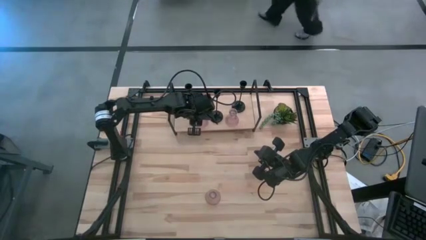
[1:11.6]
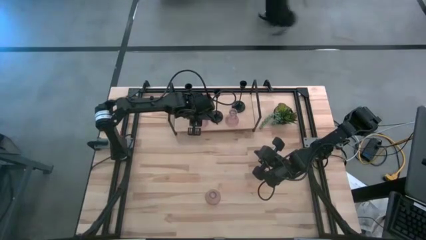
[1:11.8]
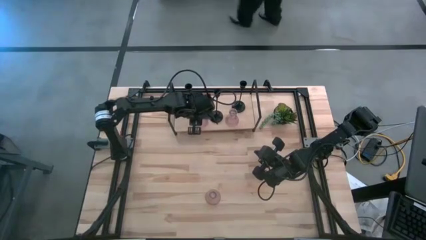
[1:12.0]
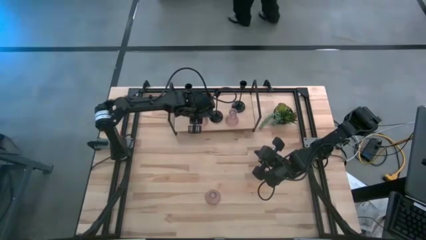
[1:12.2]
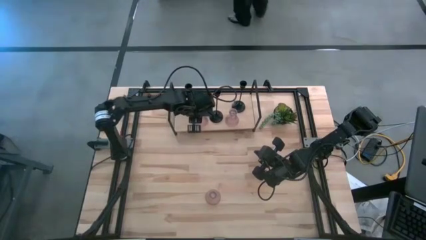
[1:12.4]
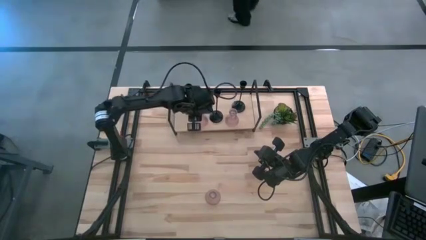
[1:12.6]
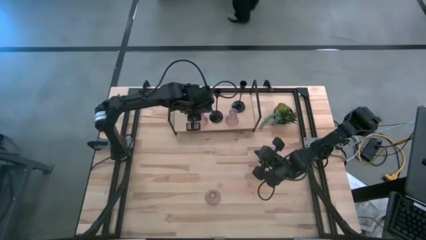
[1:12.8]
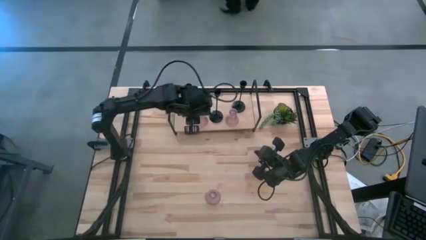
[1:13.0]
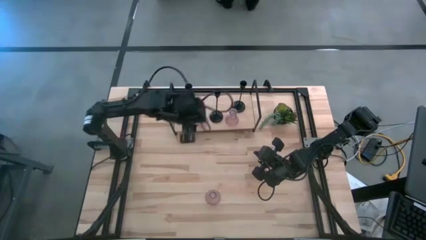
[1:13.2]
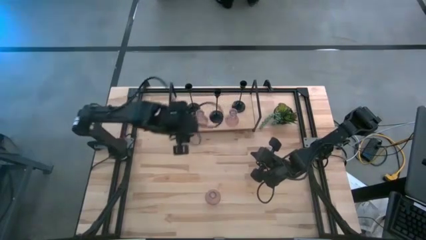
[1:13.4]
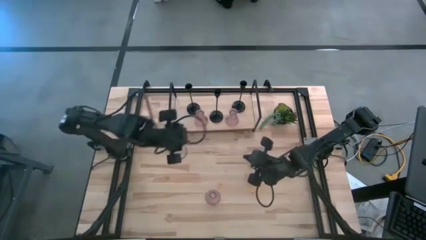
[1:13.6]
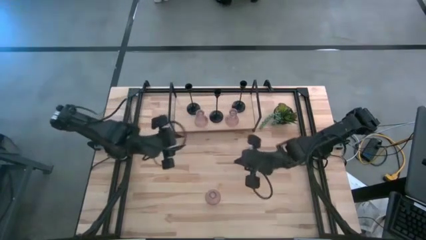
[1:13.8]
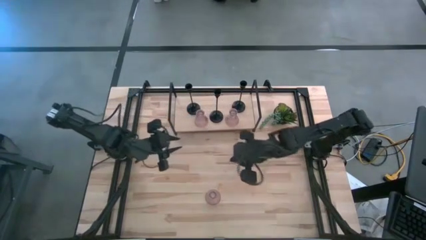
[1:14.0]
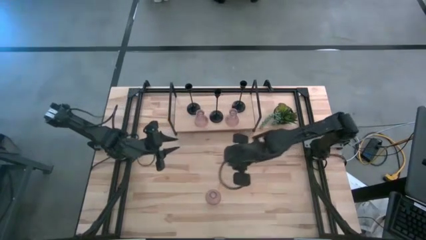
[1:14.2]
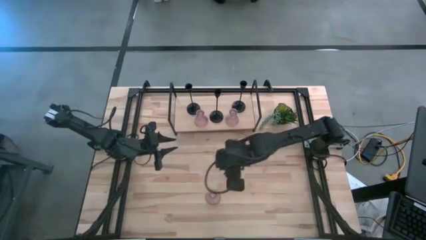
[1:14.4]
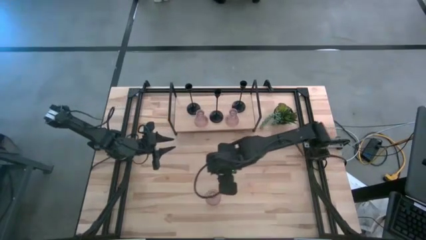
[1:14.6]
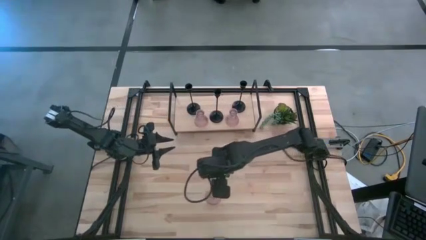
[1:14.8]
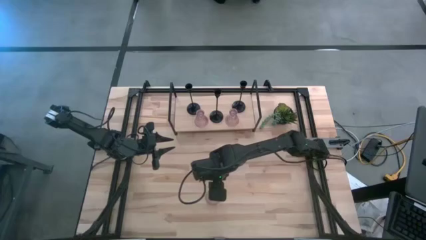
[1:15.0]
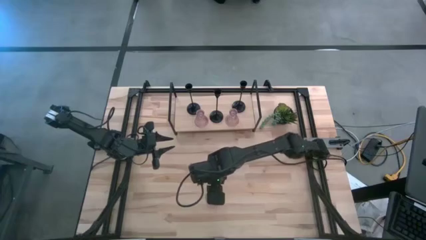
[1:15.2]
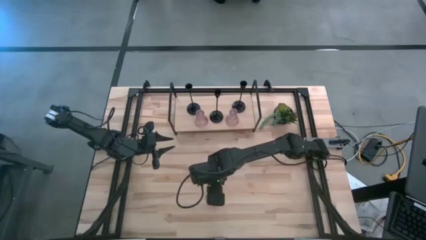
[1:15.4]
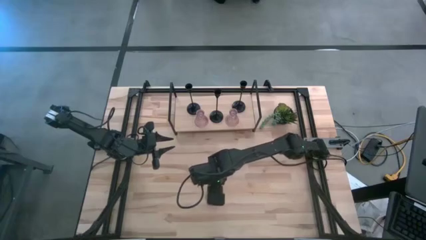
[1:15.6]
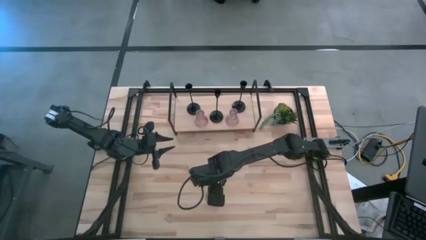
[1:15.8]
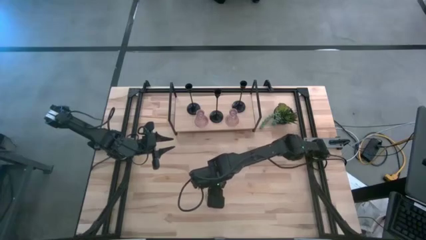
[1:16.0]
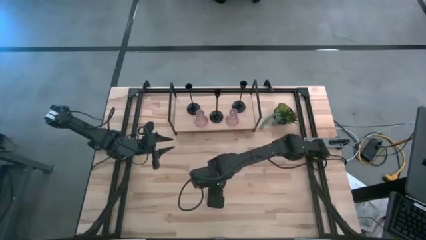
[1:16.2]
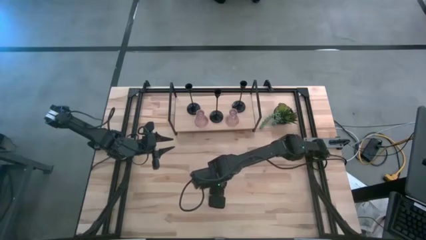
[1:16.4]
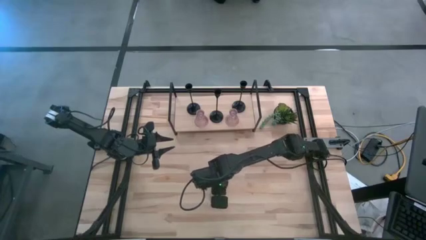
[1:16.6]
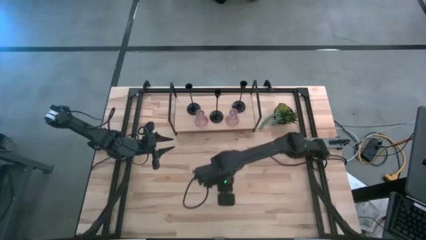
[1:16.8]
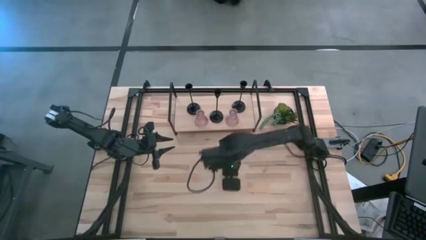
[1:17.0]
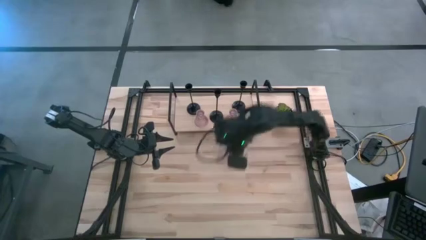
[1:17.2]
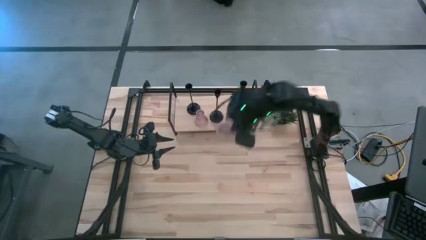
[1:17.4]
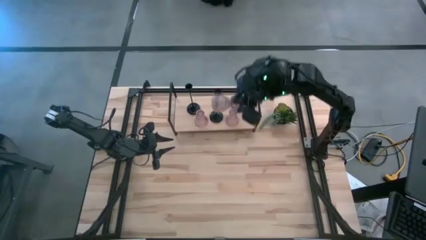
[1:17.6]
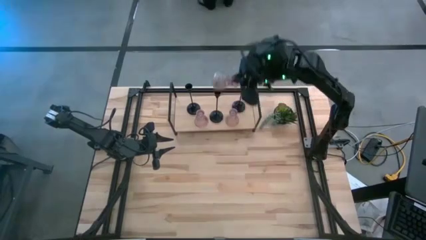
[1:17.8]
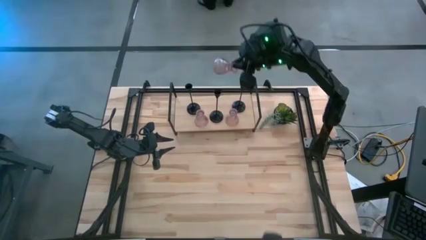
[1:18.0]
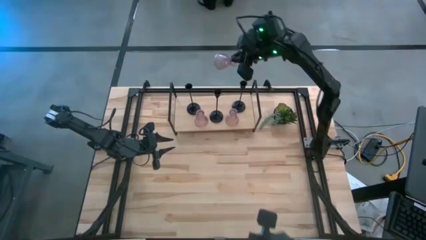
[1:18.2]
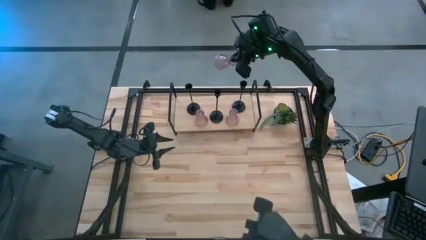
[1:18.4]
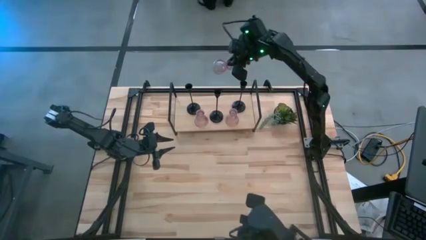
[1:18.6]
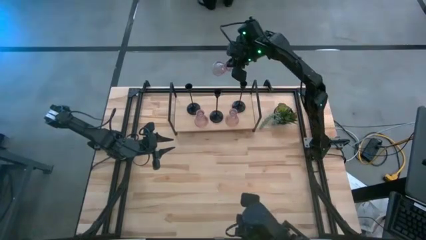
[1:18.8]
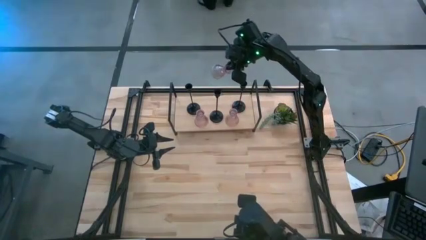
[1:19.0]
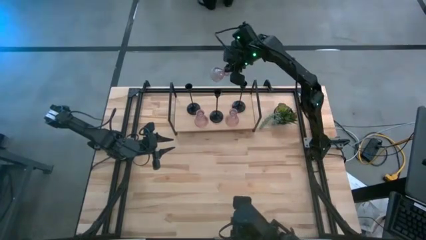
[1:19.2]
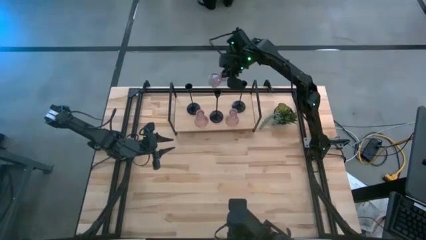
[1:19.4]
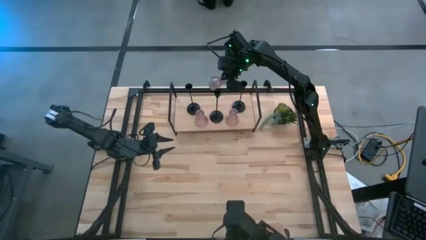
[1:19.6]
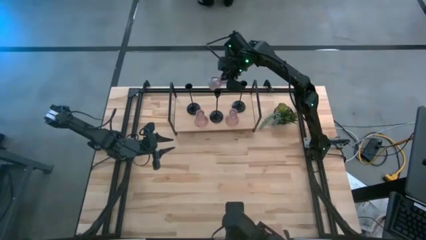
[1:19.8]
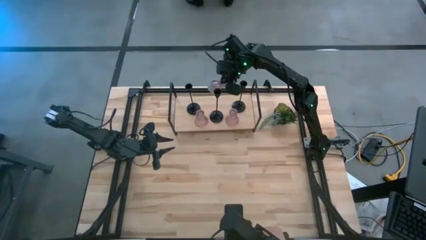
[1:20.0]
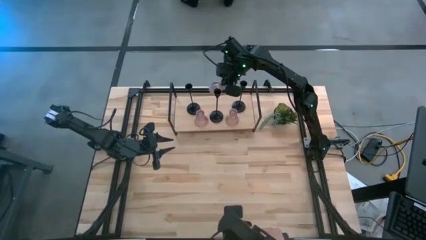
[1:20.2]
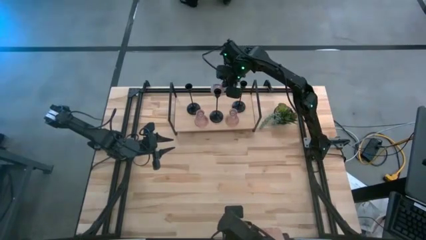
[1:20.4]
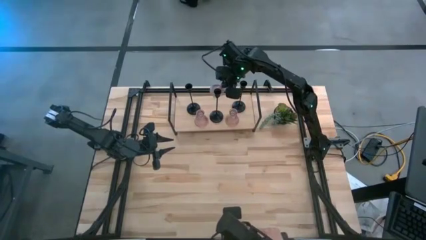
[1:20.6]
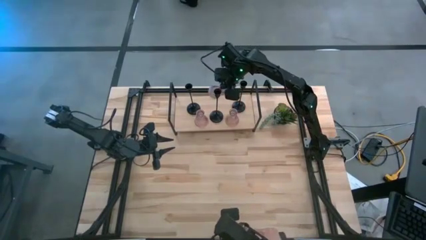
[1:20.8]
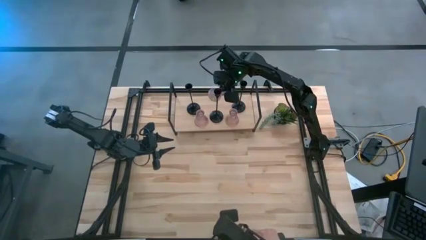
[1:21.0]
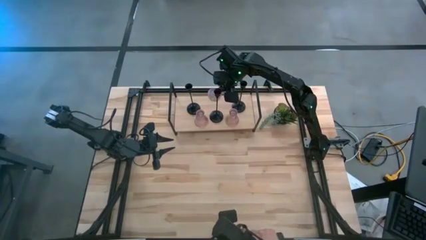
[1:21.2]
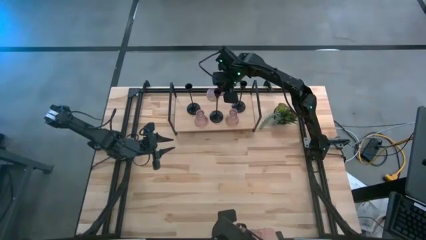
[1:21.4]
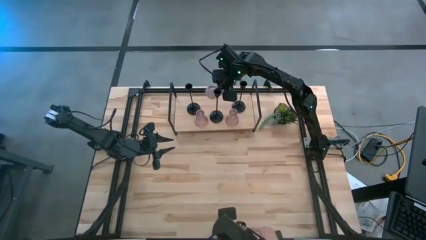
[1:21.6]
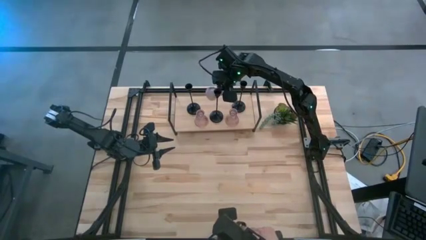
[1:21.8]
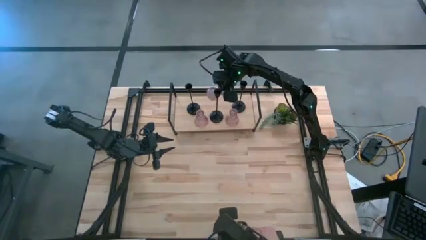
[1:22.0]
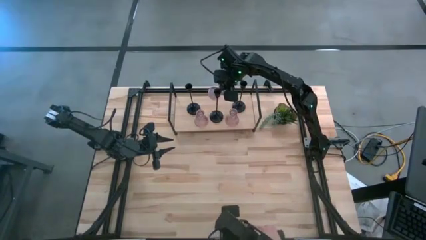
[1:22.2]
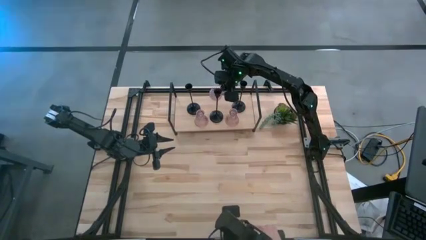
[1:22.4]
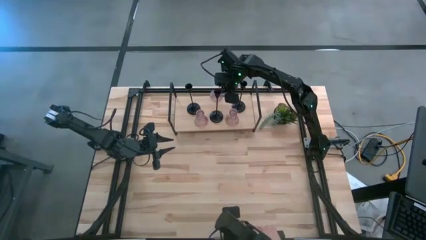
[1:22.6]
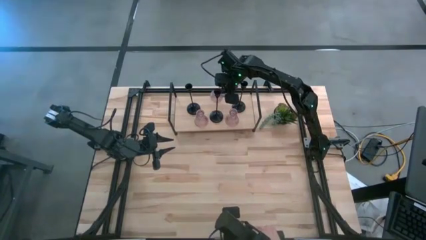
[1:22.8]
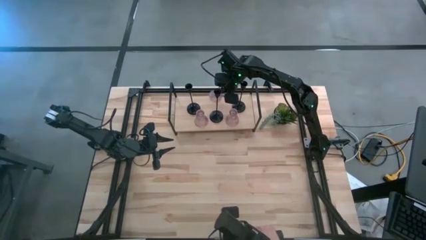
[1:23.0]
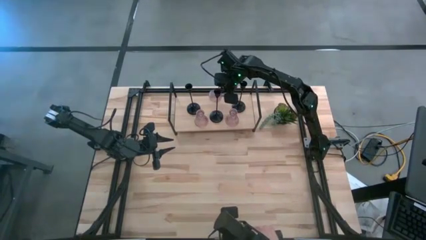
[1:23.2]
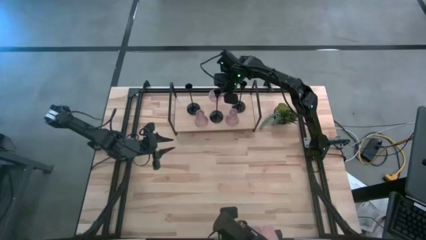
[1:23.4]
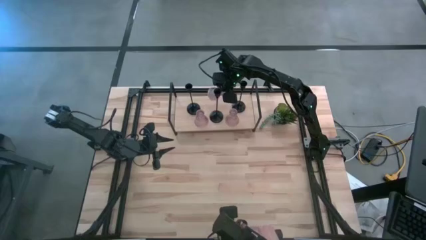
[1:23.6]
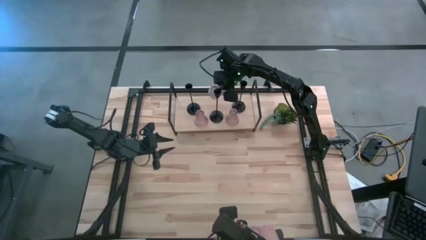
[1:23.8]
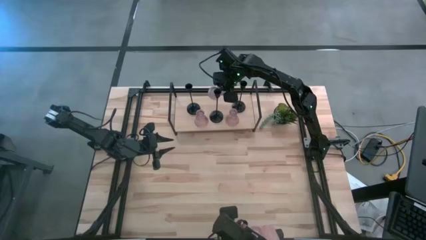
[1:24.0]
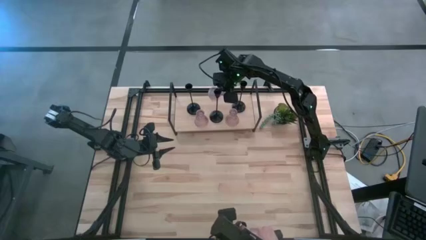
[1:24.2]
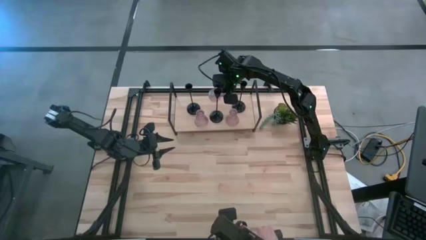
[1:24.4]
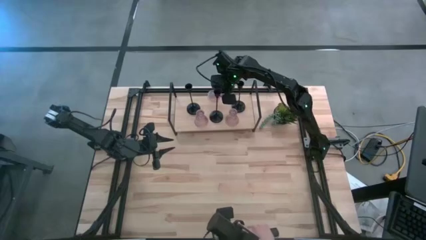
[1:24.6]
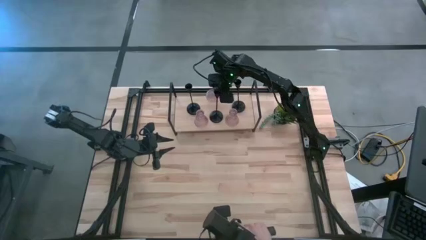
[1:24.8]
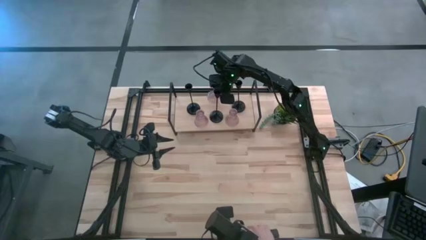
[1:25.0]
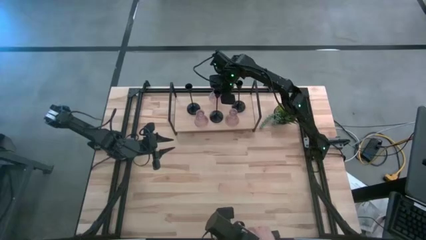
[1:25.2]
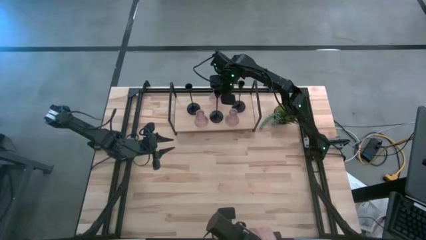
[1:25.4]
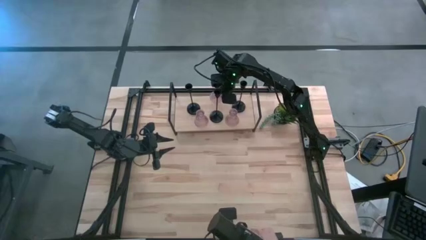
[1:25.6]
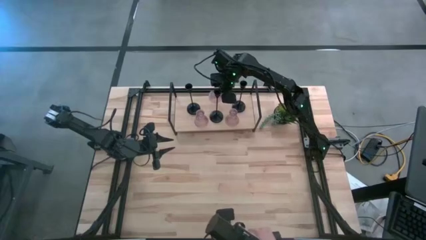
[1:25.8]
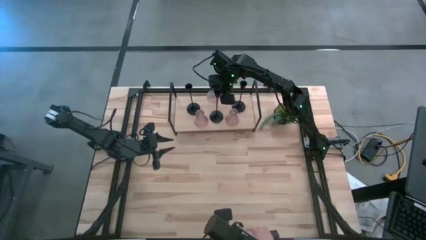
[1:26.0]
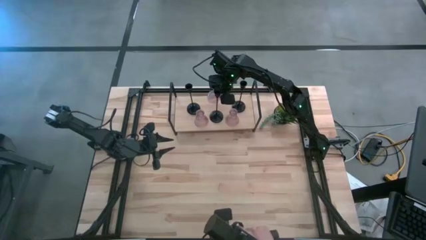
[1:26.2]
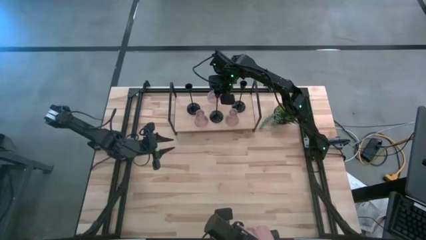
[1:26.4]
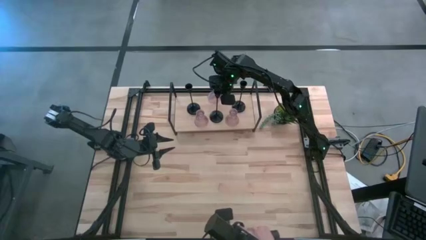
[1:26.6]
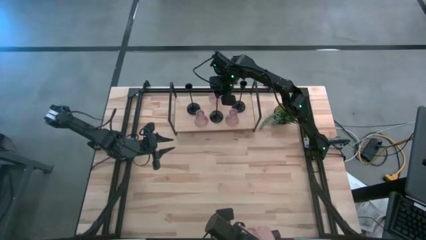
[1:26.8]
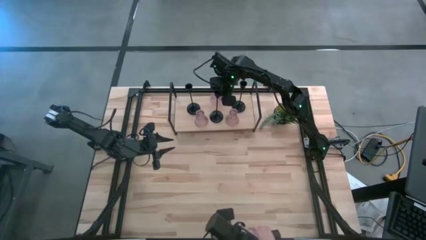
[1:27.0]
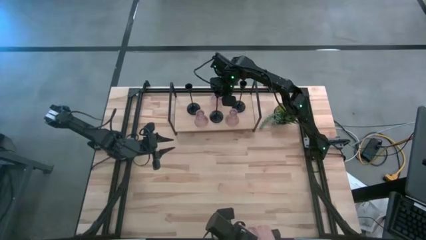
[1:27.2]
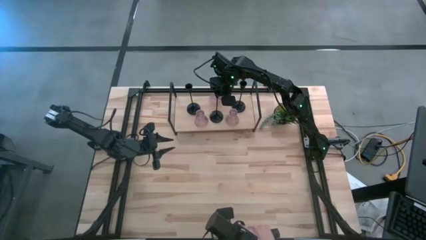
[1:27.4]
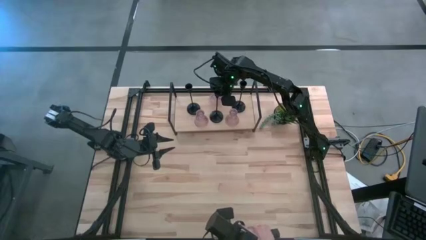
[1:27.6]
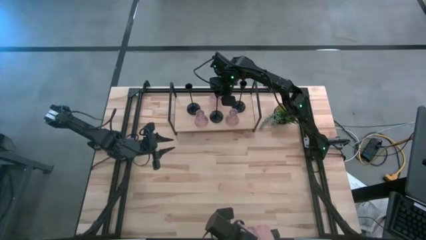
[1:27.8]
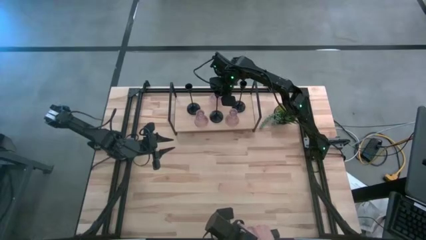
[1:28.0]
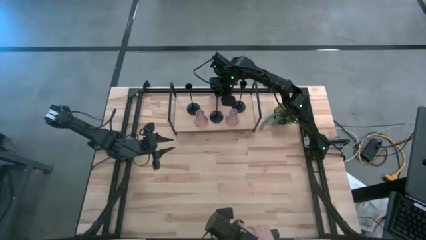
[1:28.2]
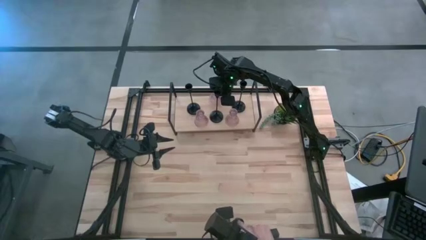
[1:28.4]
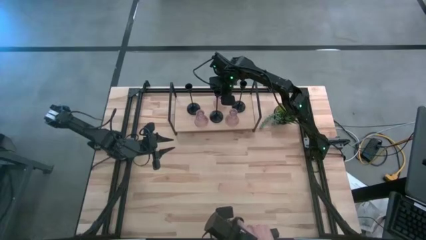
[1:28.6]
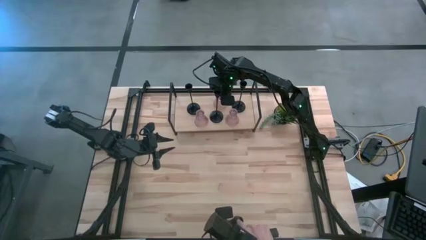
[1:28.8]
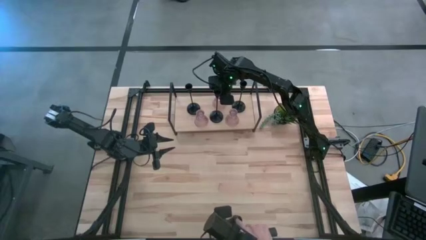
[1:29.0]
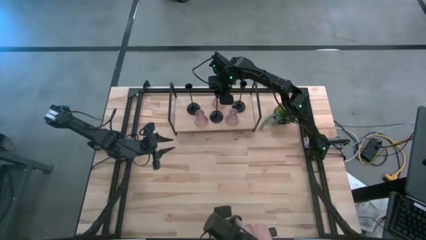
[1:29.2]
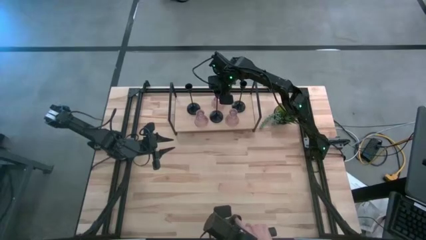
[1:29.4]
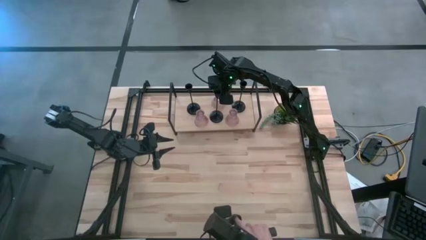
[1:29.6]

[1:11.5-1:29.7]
Task: Pick & Place candle stick holders
Put the pink candle holder on the shelf
